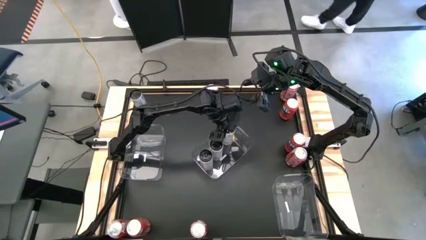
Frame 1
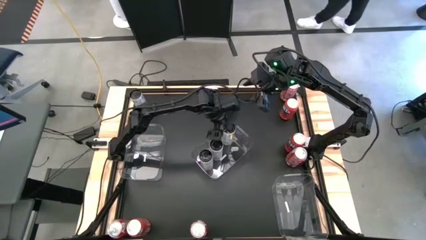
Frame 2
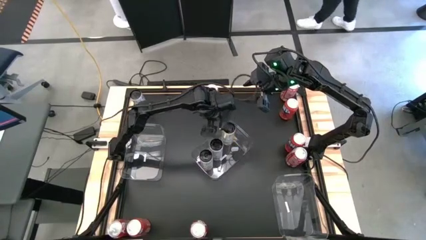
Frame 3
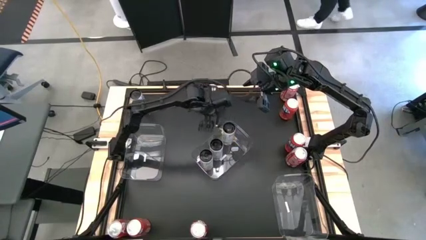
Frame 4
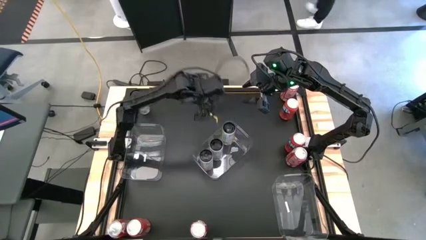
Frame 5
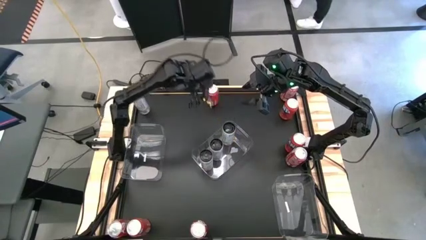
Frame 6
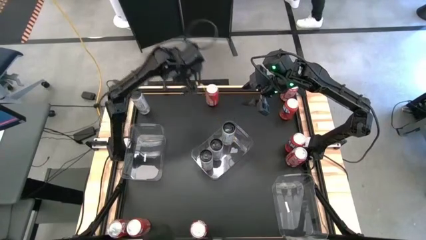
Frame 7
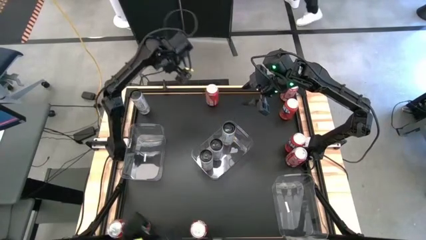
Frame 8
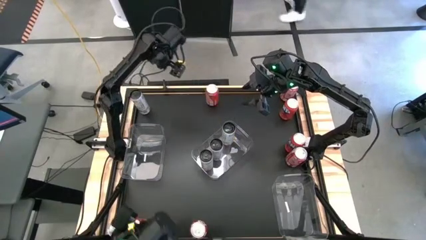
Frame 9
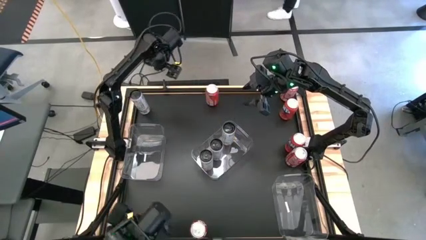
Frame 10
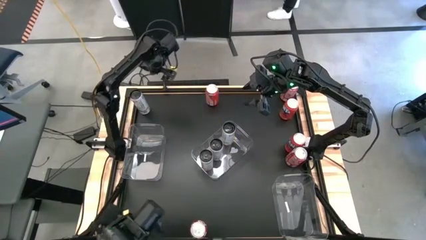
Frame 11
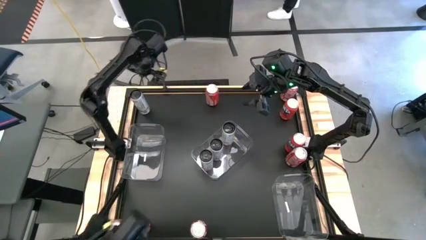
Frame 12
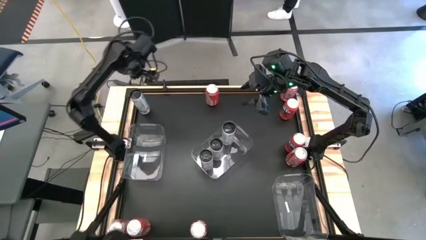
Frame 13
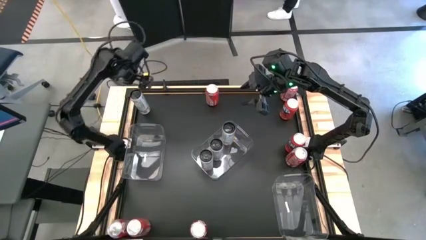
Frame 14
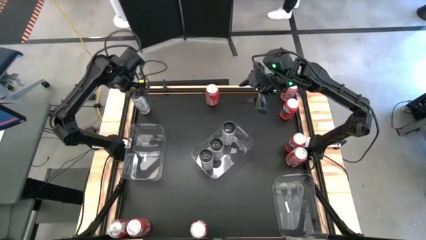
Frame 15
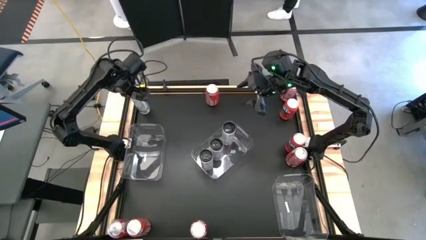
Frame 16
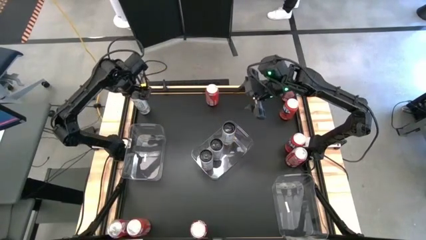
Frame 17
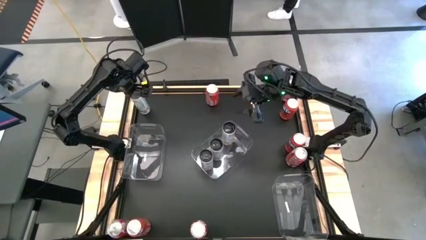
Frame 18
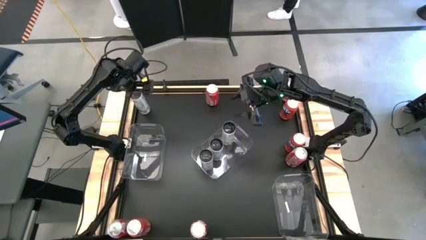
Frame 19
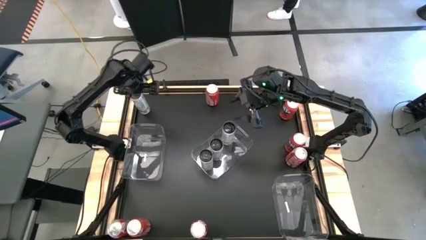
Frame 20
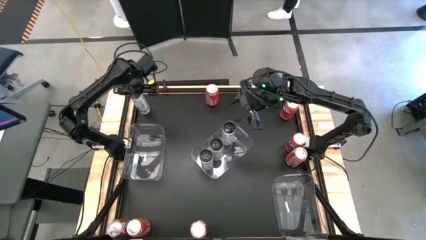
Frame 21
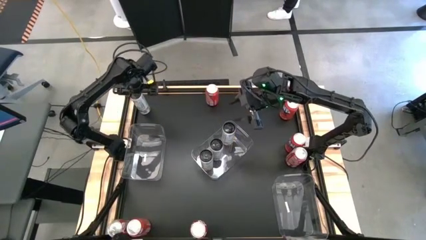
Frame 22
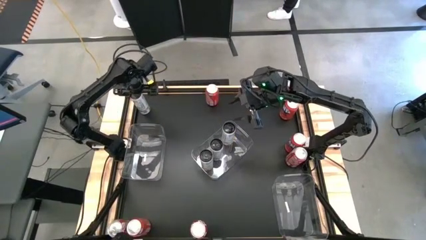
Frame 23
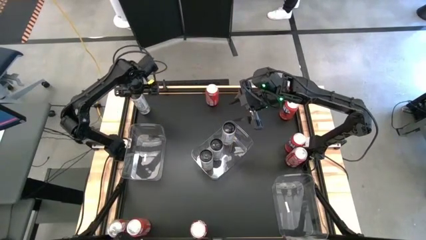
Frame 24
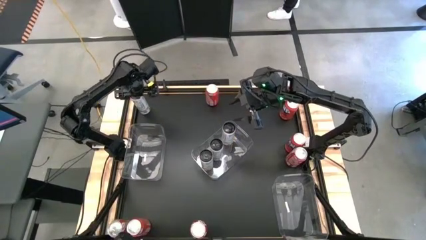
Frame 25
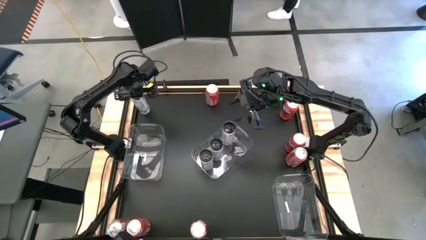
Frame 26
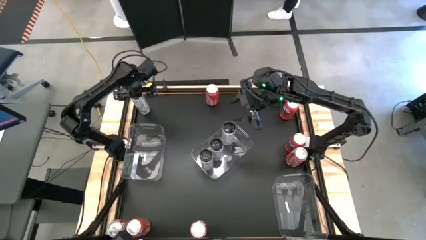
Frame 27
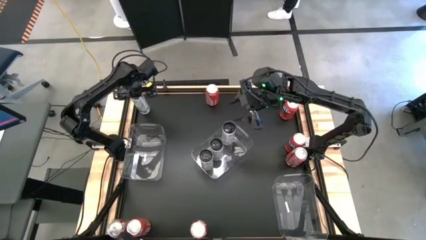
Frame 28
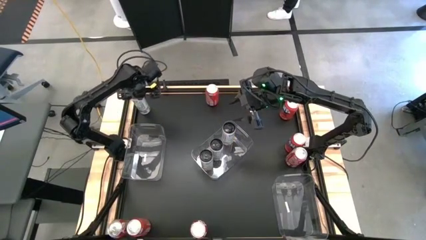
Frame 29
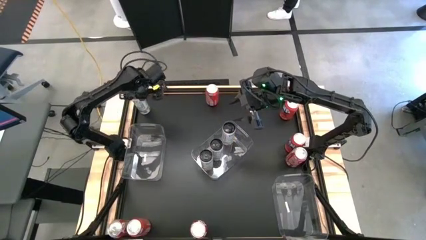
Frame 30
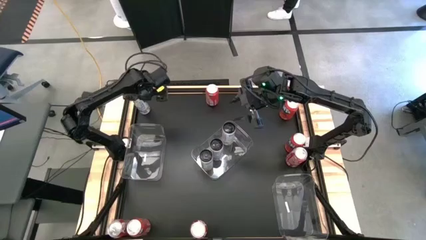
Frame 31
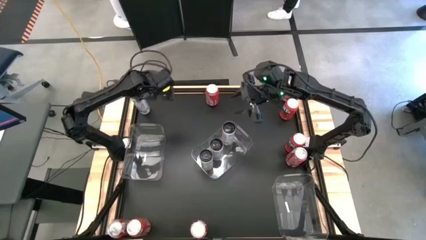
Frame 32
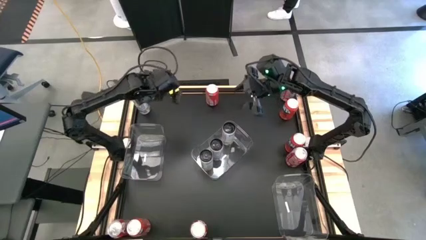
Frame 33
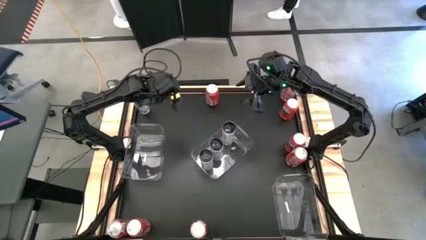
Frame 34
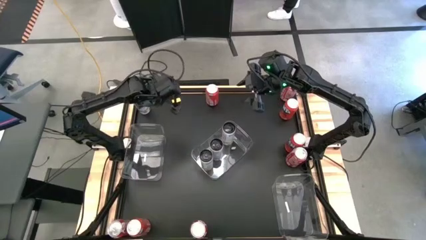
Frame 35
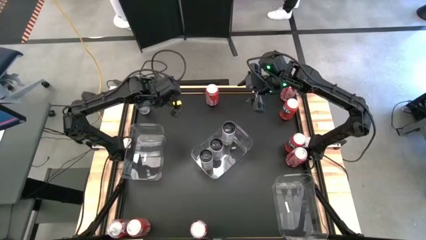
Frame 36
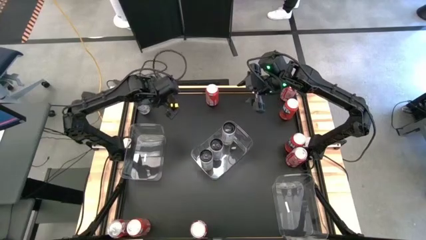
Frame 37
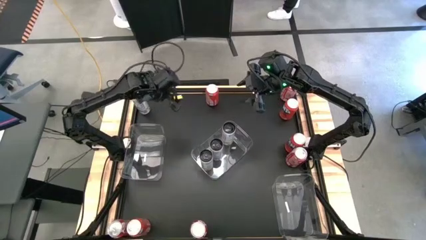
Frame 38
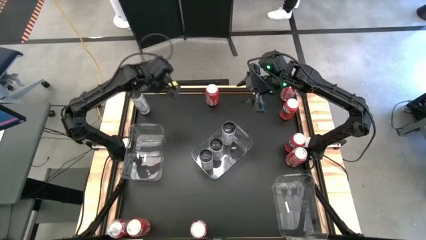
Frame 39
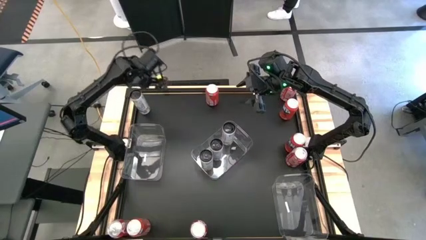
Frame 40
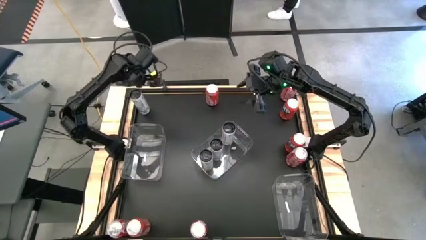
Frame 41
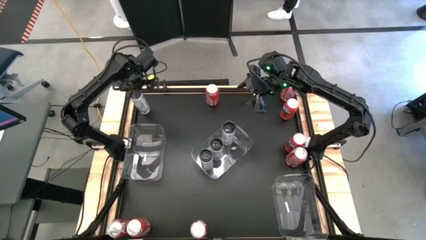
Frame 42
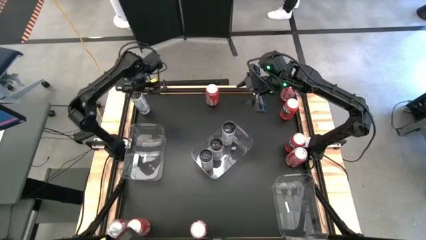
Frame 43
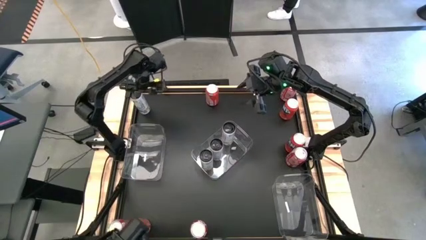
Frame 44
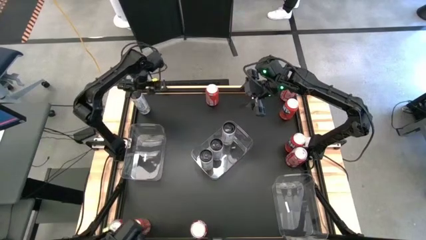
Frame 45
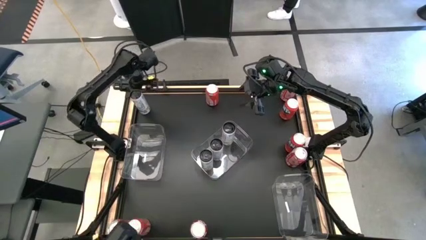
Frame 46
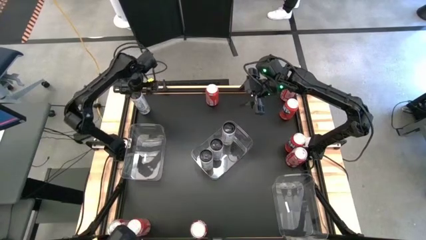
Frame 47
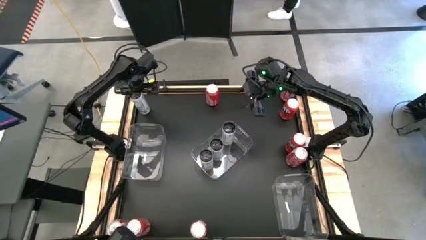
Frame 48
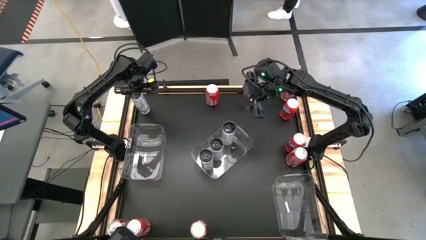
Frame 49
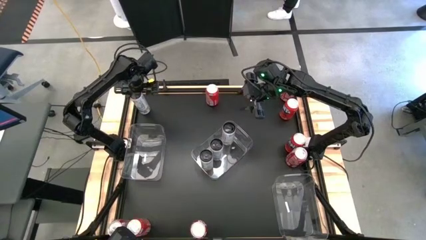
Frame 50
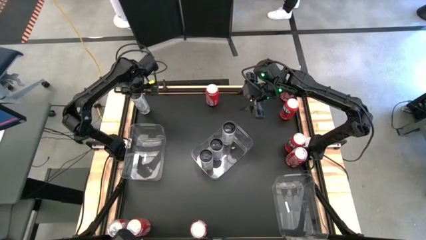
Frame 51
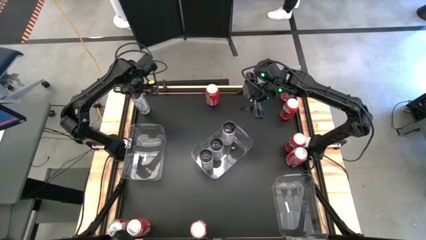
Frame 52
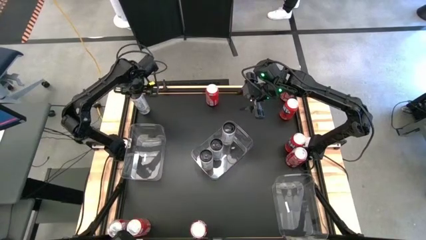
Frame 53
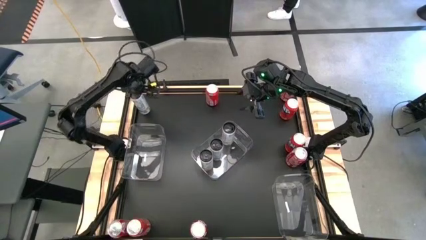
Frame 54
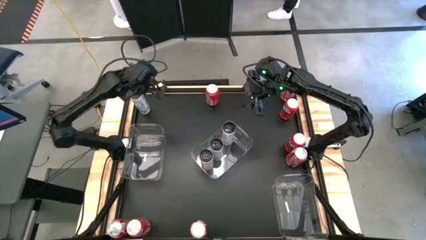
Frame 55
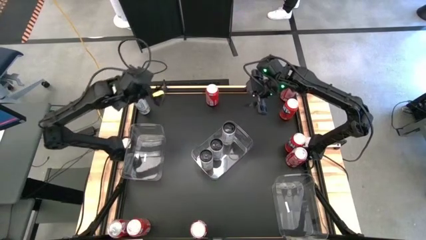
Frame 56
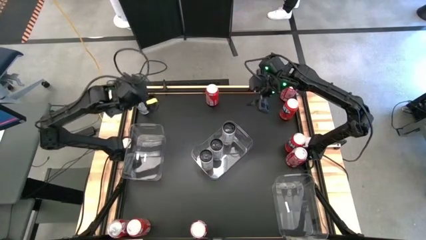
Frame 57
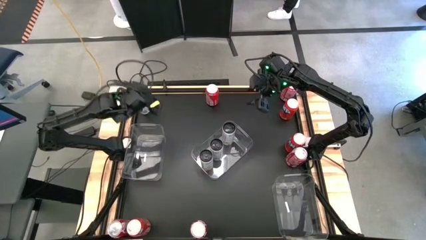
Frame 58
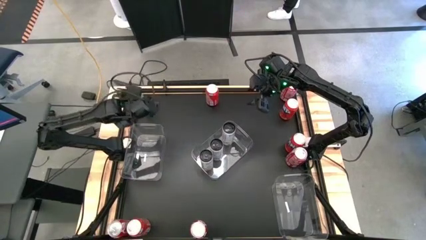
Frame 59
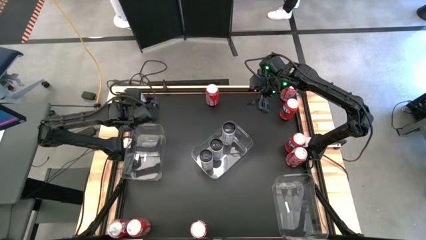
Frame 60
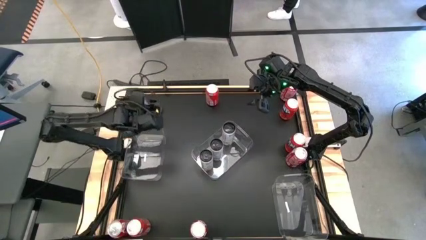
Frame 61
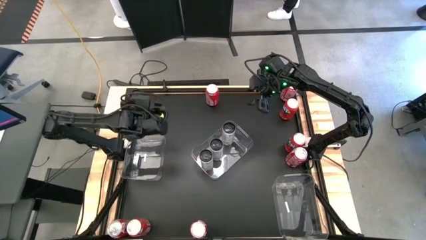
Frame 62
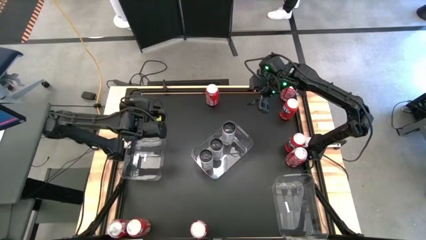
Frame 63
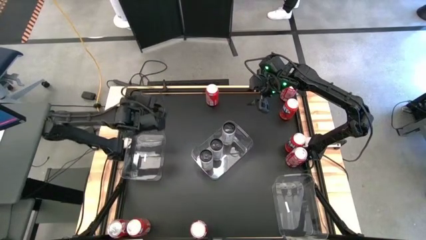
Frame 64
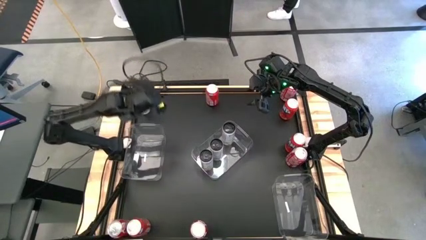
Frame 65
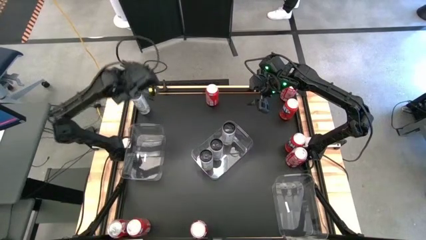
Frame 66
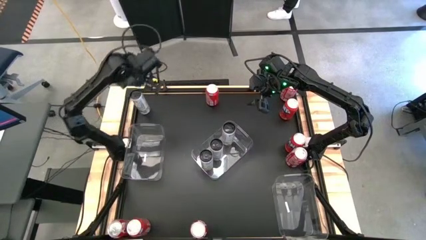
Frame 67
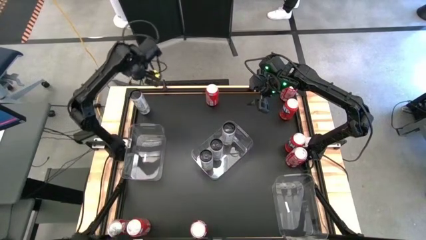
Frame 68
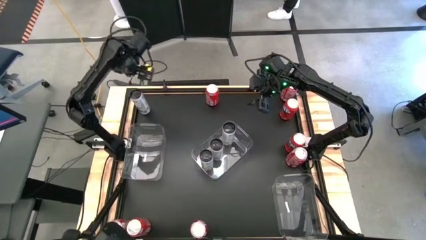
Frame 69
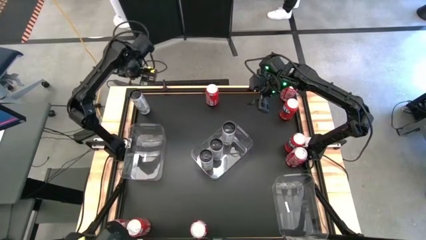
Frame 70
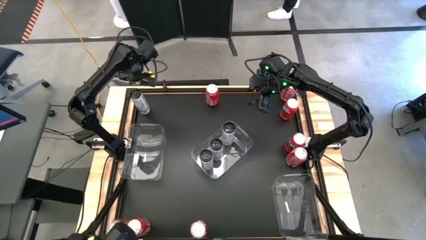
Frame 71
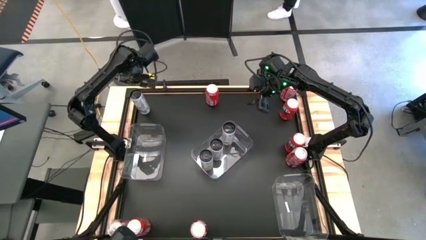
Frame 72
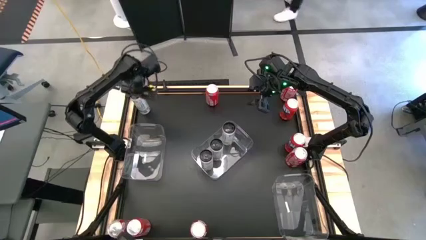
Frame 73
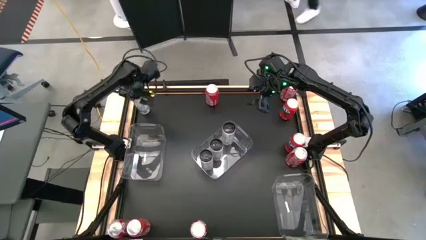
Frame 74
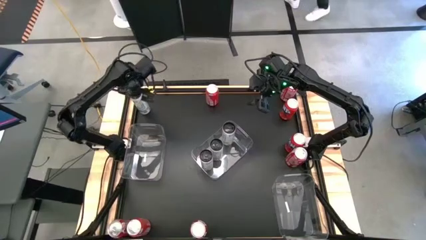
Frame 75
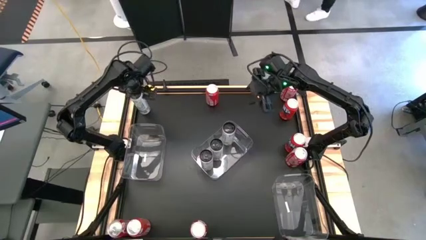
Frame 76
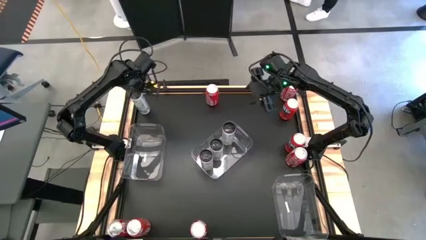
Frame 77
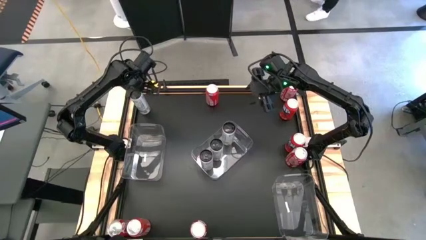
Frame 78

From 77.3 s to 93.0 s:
Task: Sort soda cans
Put the white soda can into the middle transparent bin

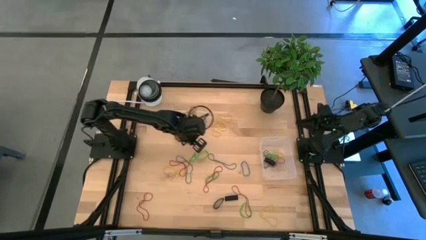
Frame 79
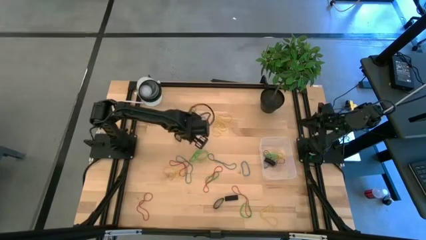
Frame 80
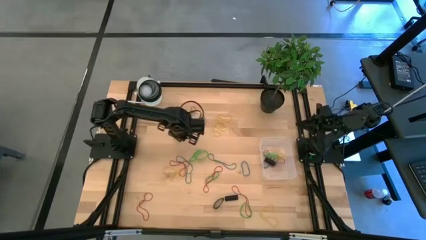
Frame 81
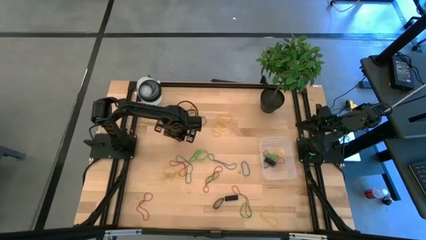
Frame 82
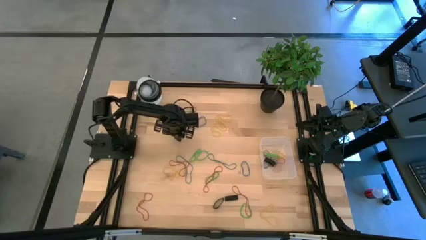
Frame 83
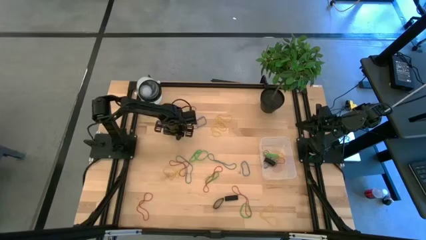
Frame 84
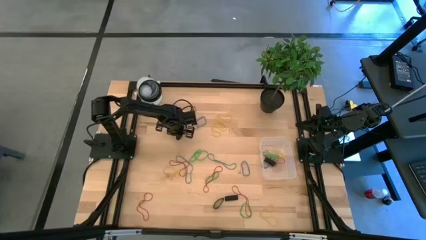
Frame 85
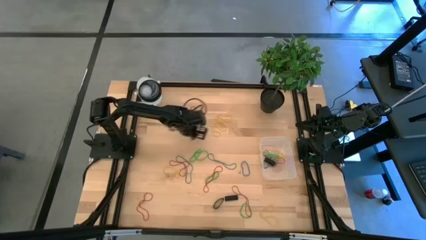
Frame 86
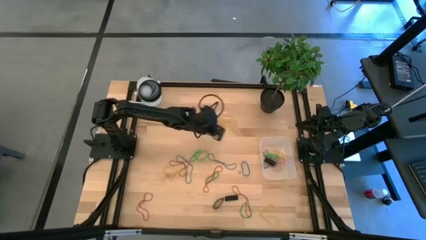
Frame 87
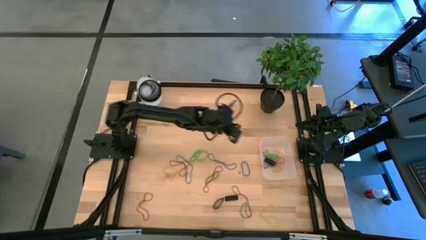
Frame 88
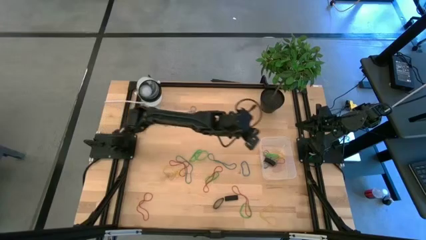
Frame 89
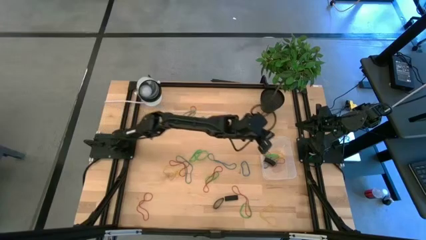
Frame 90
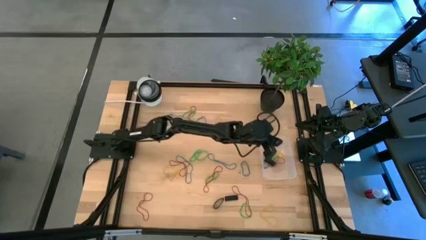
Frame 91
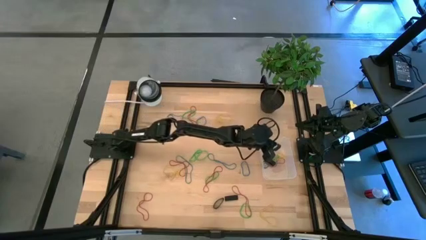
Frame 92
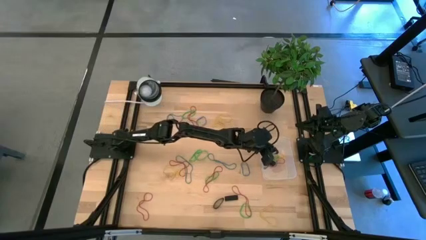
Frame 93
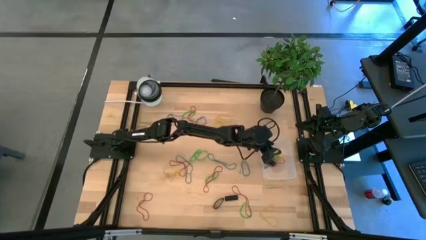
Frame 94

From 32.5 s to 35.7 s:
Task: Pick and place rubber bands into bin
Put the black rubber band into the transparent bin
